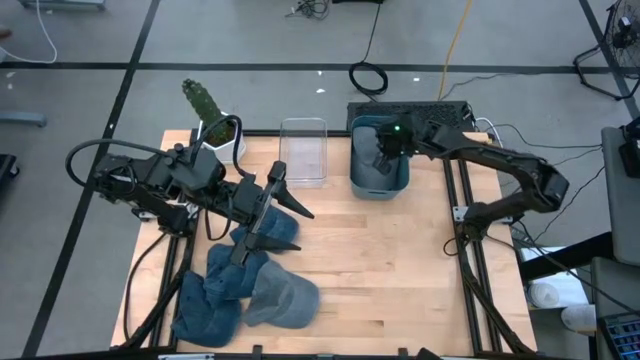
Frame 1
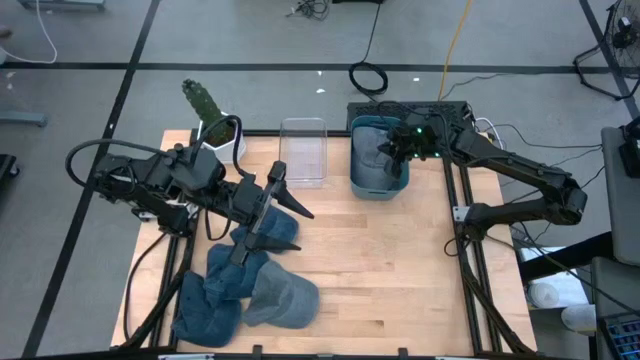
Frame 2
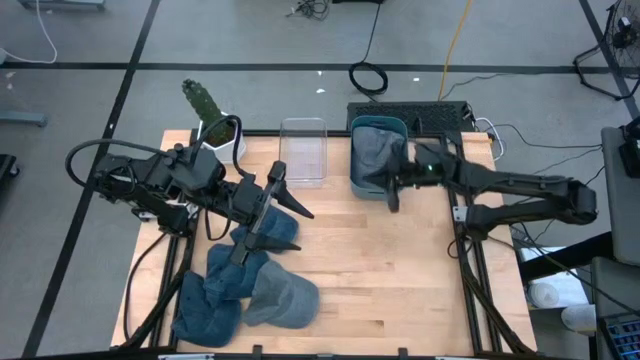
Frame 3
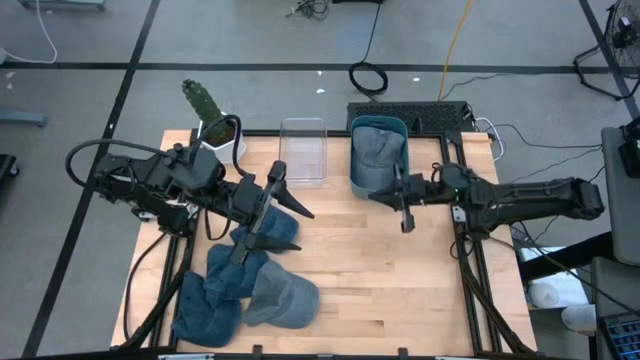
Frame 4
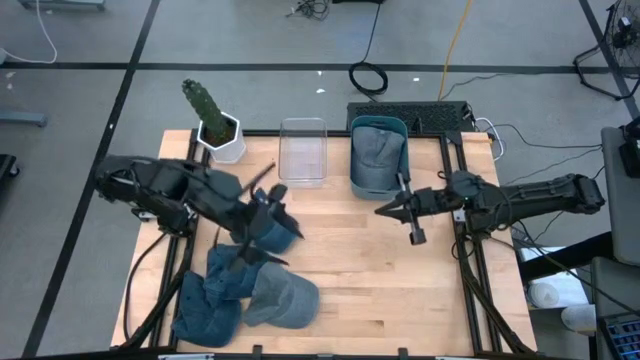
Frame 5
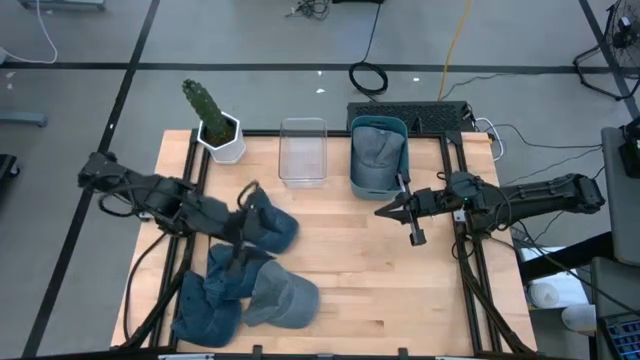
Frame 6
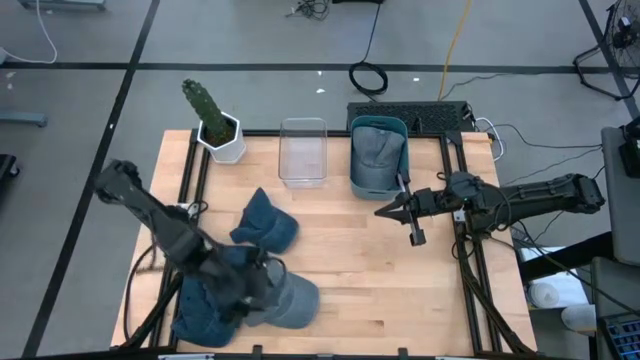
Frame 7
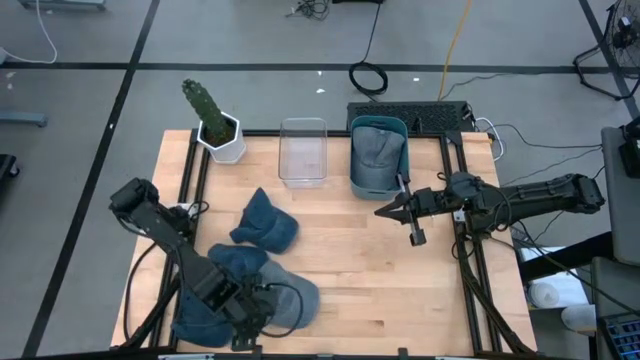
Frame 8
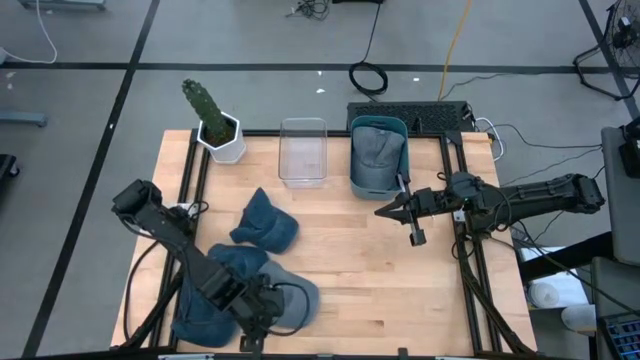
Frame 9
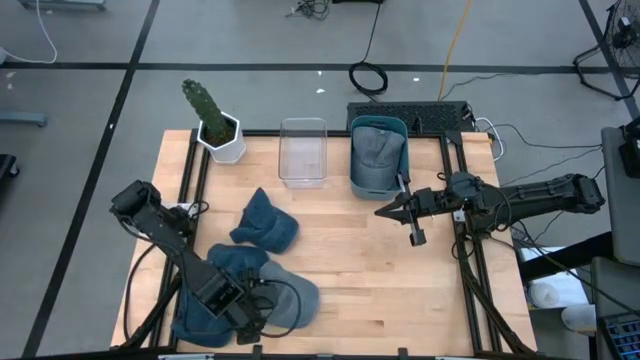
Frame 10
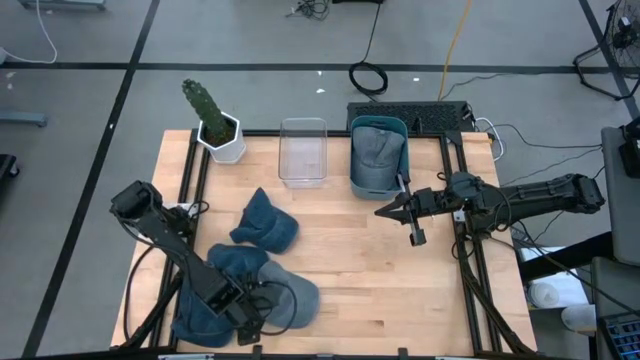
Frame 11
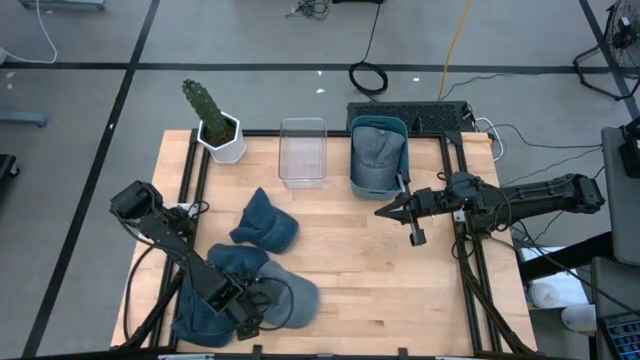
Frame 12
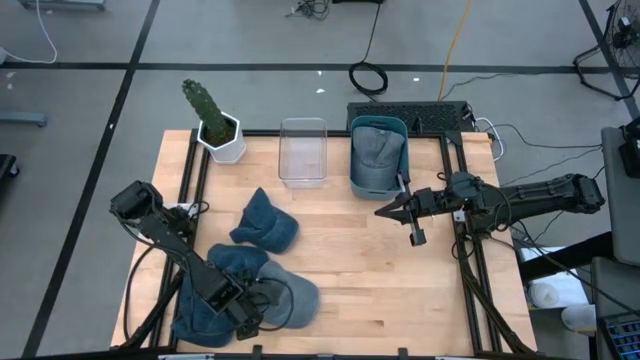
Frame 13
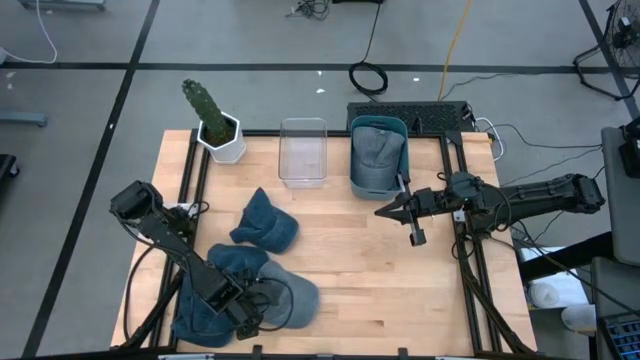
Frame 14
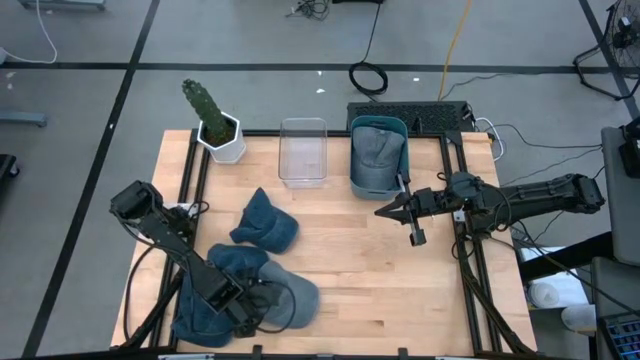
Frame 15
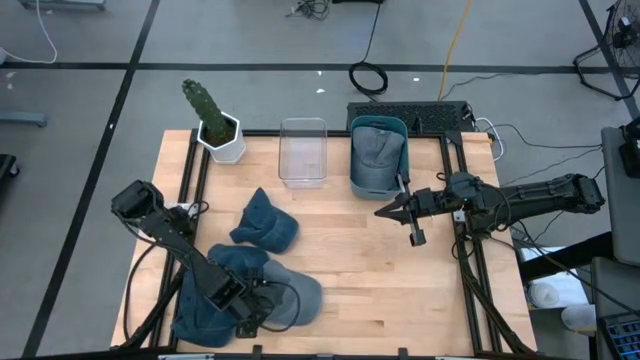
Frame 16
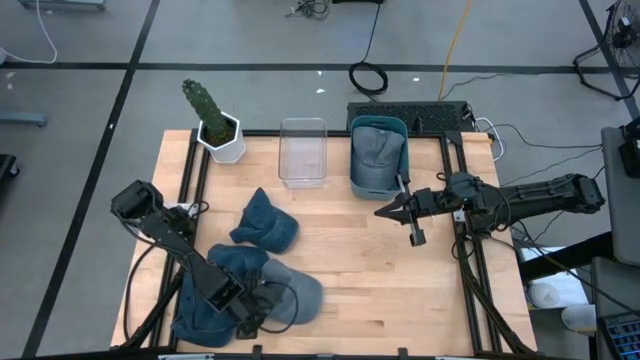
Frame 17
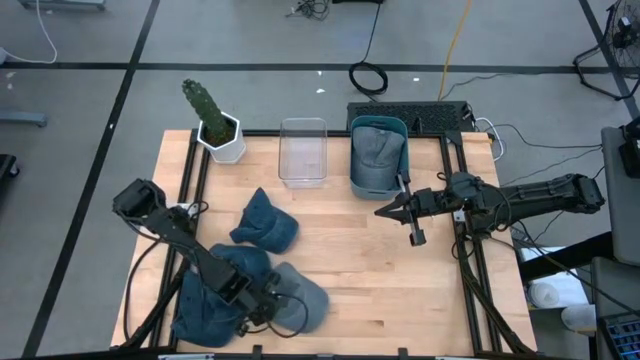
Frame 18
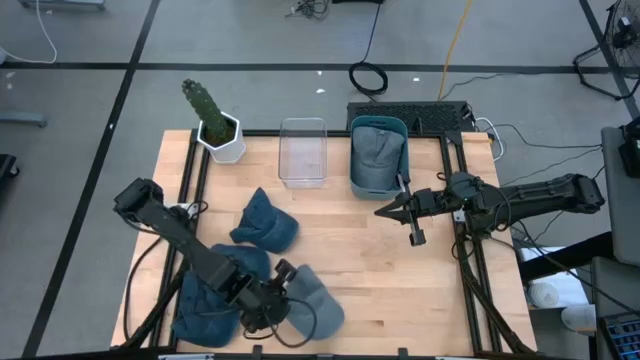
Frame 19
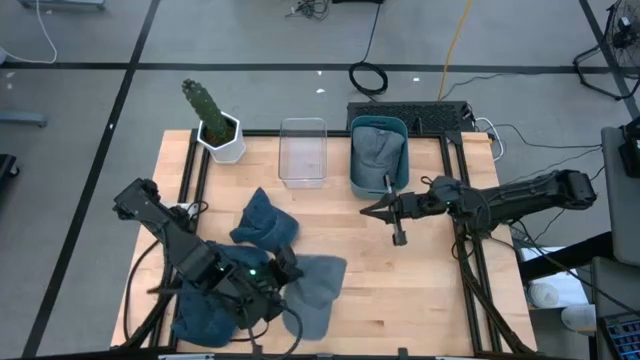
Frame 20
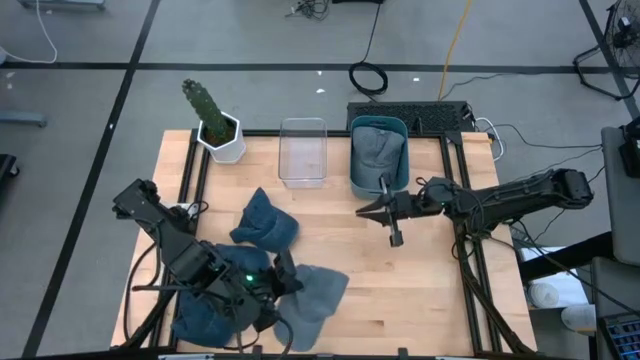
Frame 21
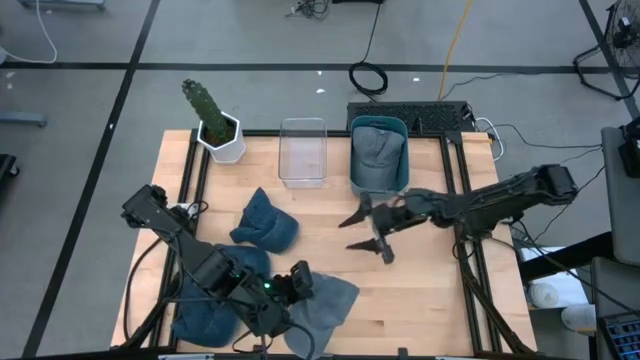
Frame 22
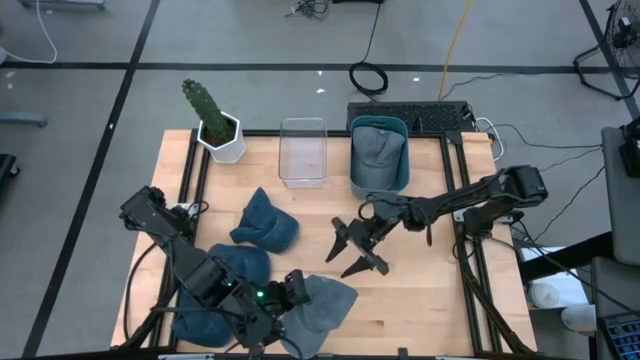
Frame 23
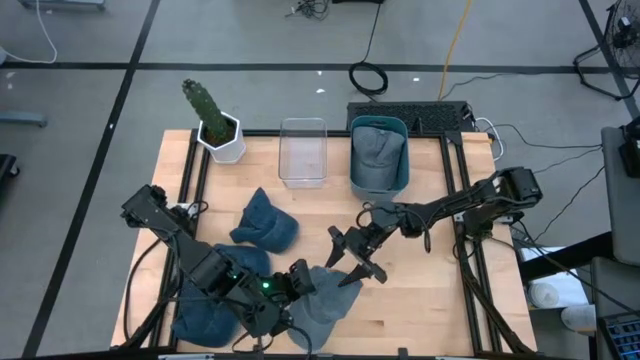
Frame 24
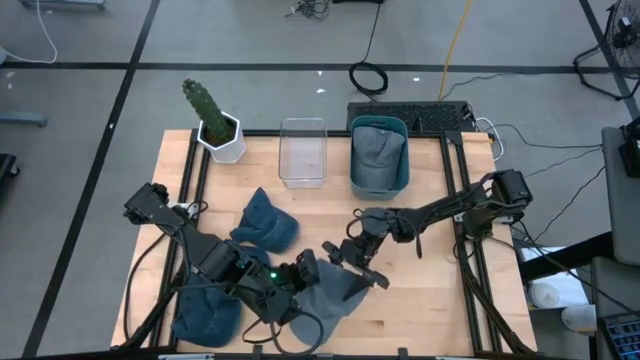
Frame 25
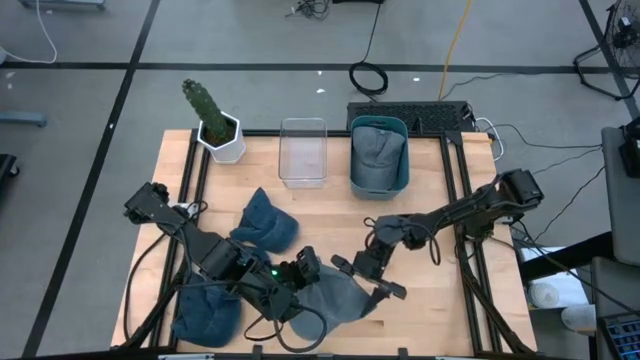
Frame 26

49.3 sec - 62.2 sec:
Task: Pick & Place hat
Put the gray cap into the blue bin

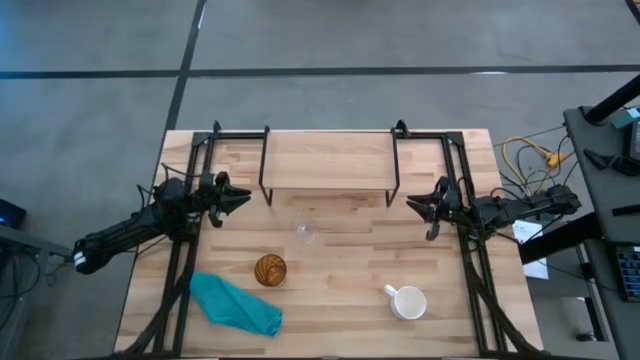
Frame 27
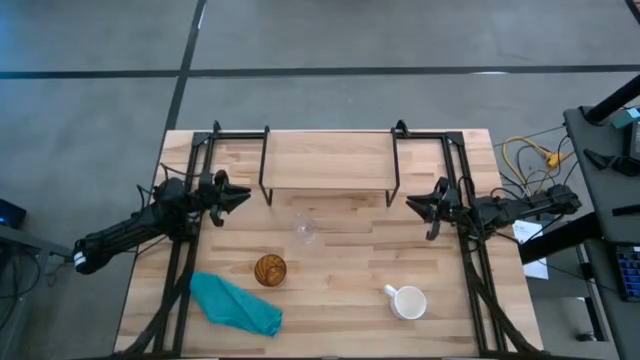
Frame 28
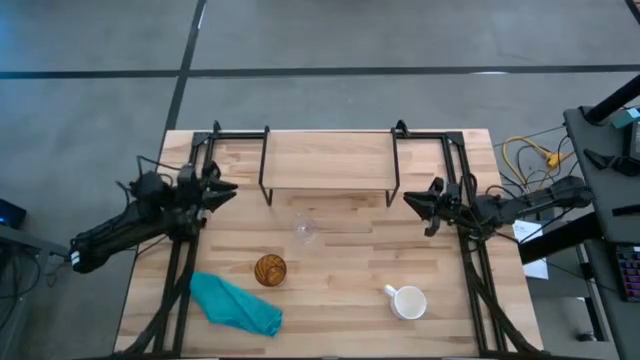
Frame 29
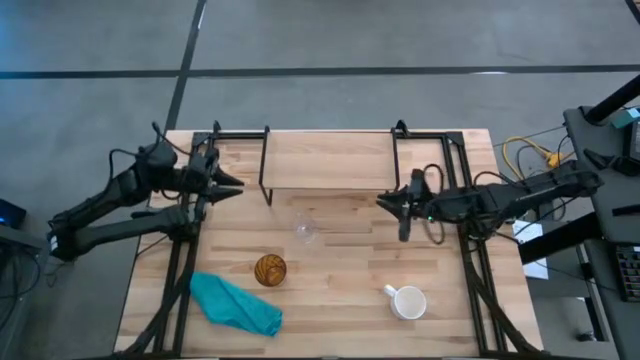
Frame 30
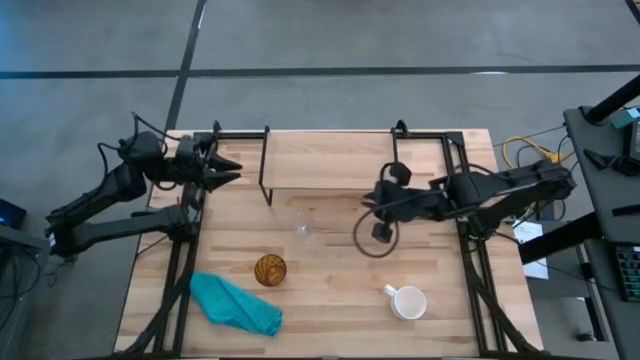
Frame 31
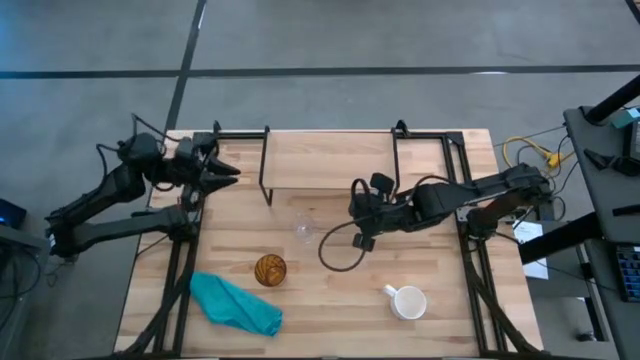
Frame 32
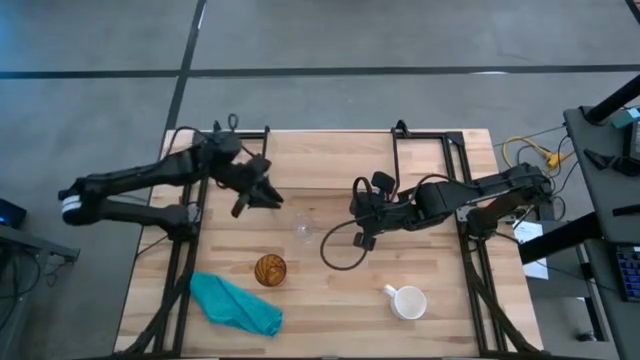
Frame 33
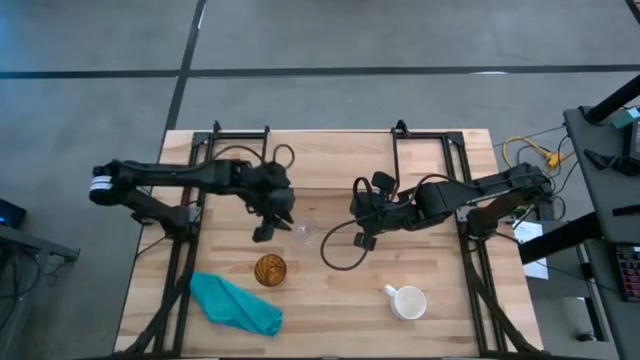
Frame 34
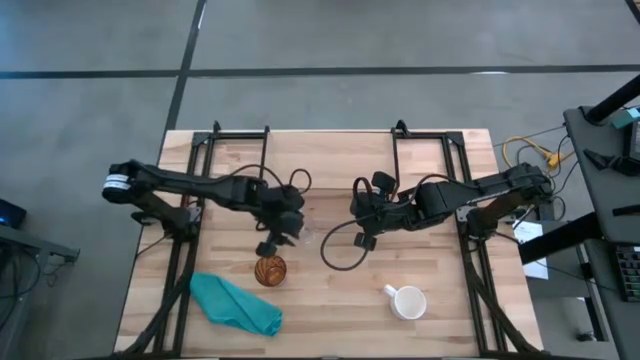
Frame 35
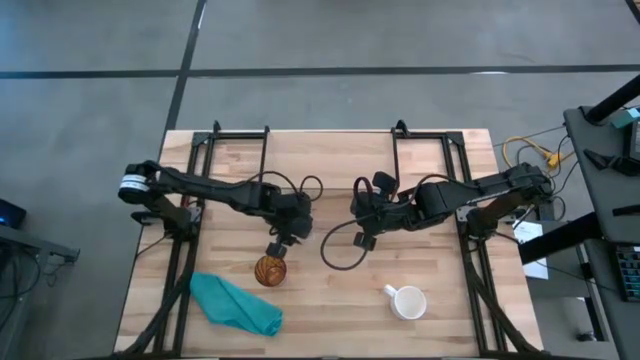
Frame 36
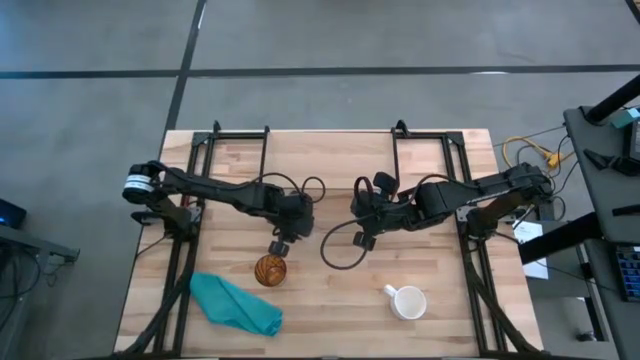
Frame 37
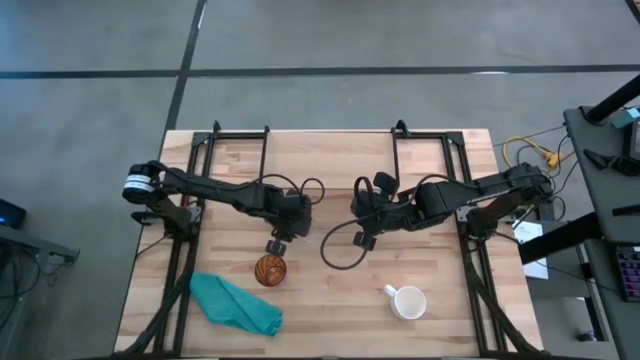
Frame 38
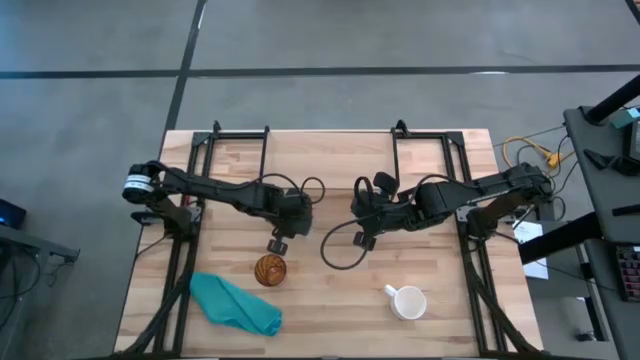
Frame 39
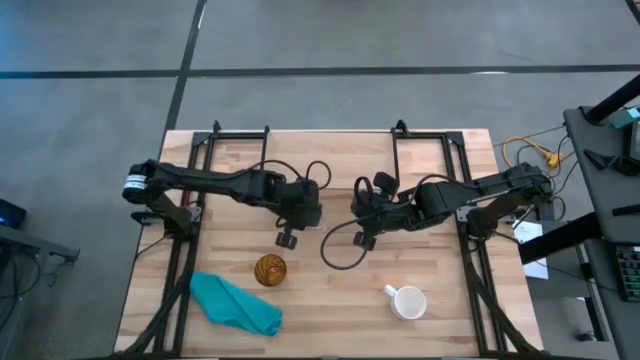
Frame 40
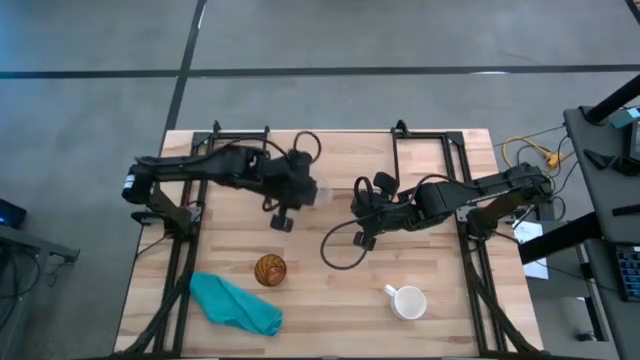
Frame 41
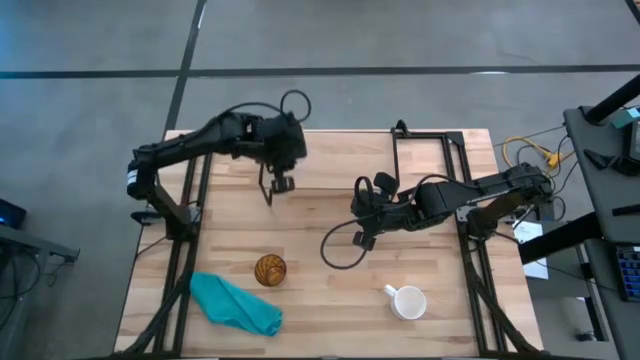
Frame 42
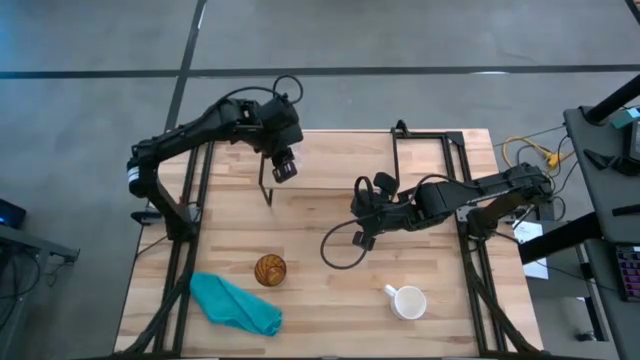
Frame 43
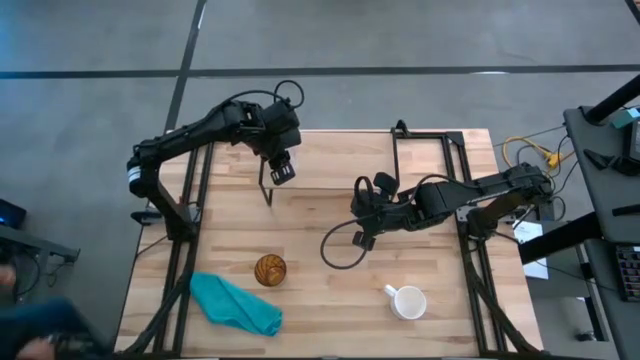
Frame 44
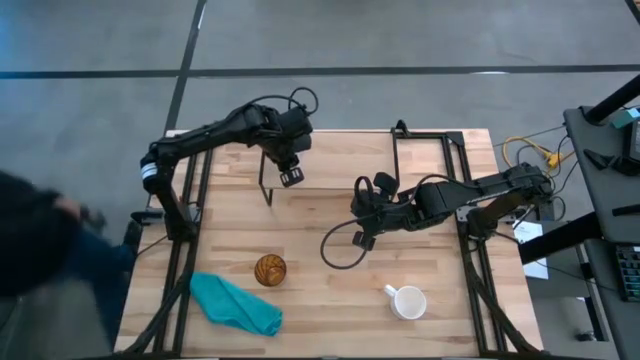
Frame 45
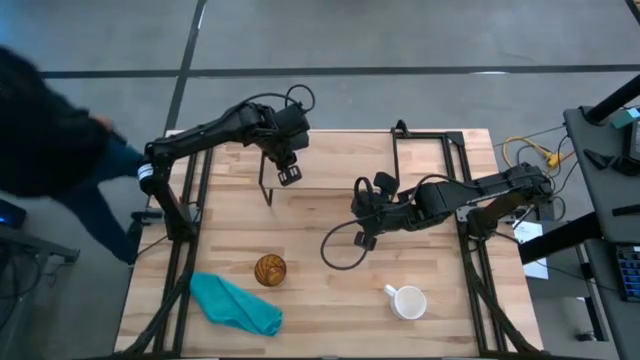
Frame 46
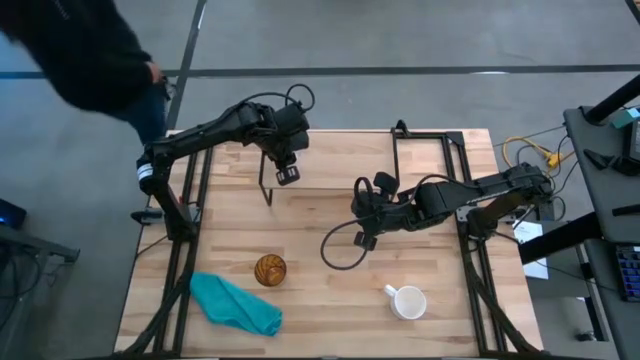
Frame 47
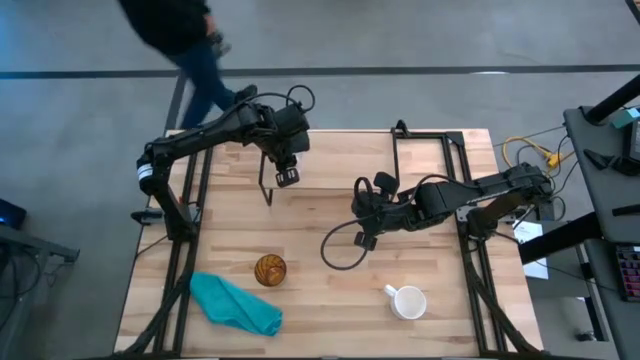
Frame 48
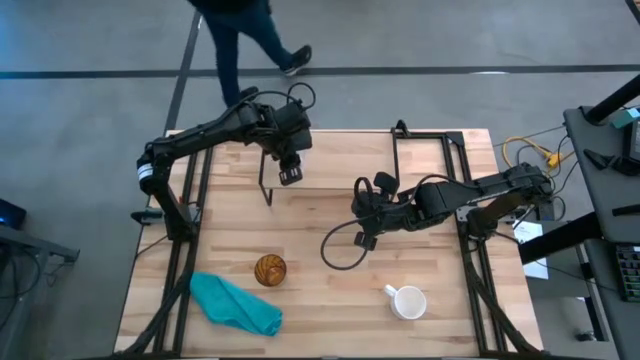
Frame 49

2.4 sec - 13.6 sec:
Task: Stack small to large cups/mugs on shelf
Put the transparent mug on the shelf
